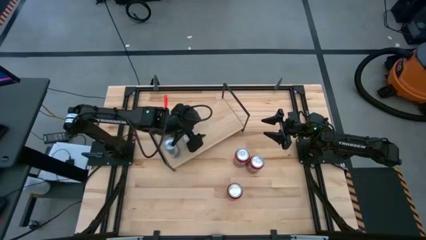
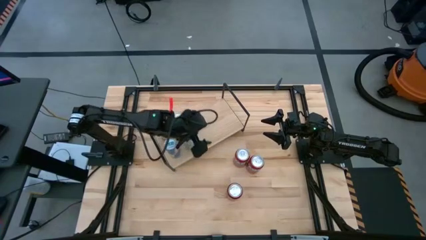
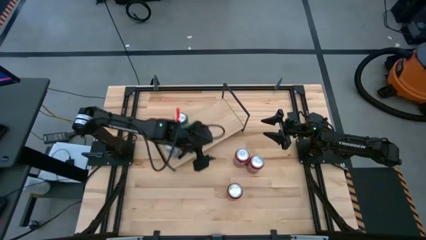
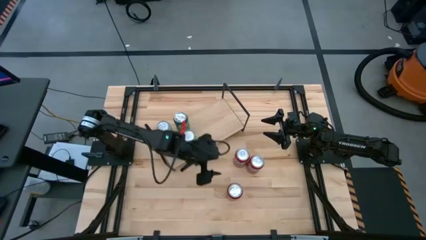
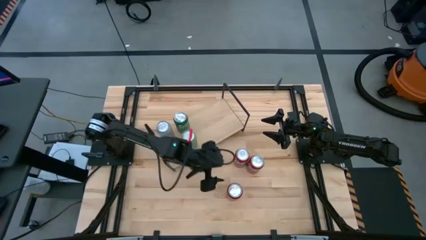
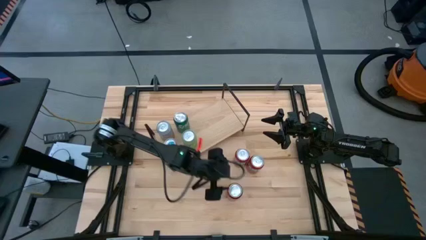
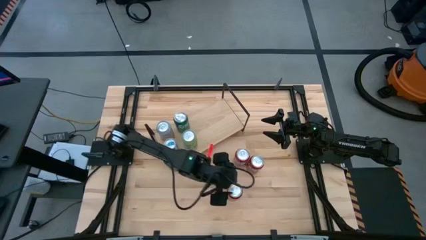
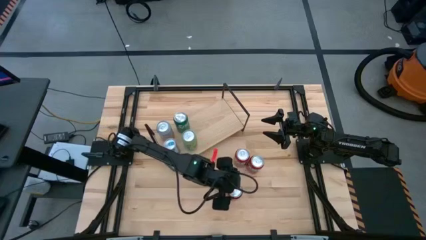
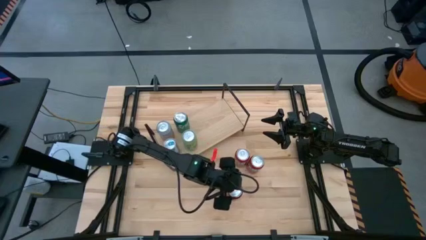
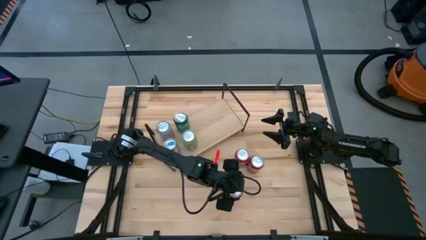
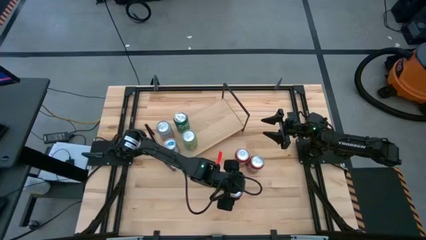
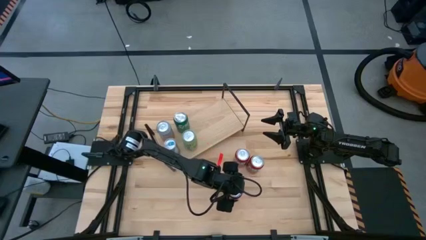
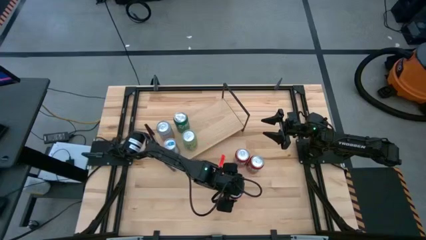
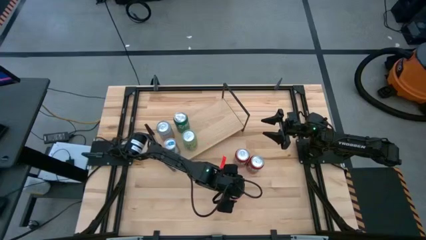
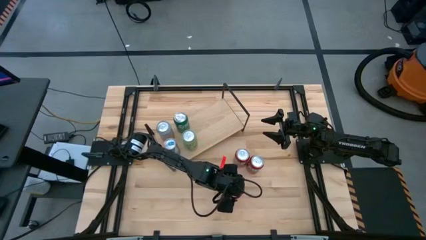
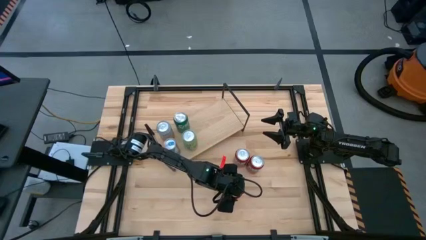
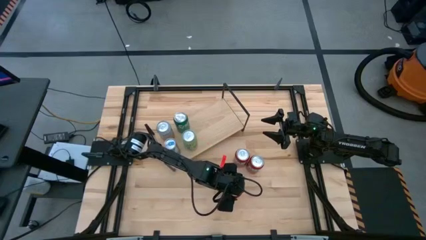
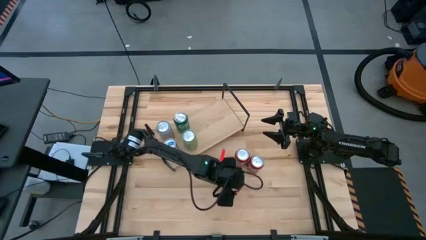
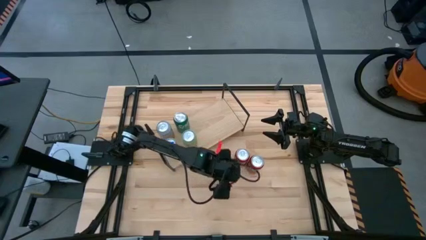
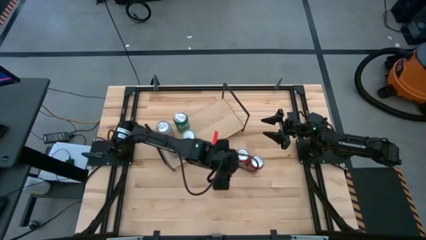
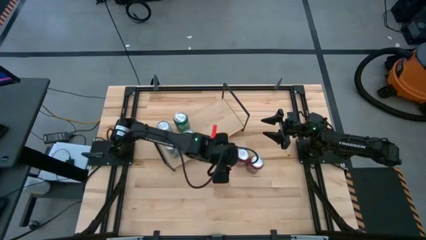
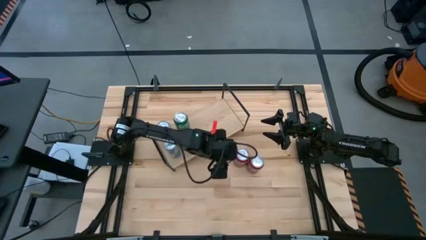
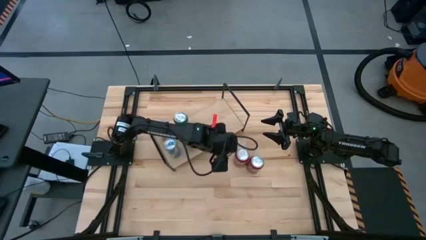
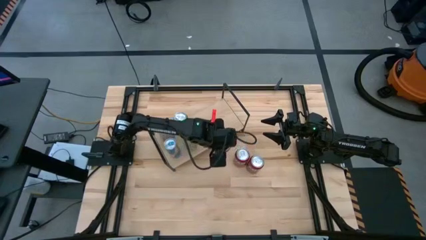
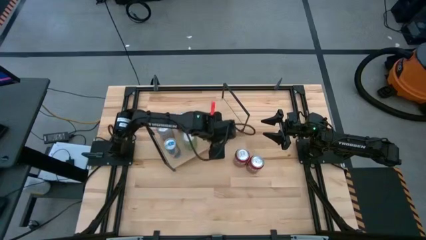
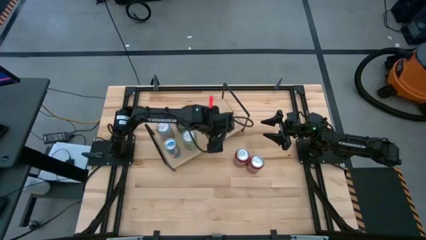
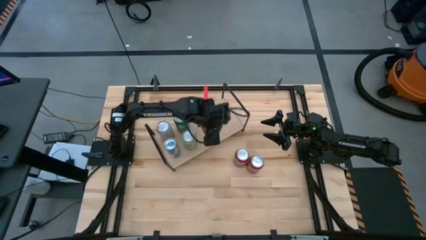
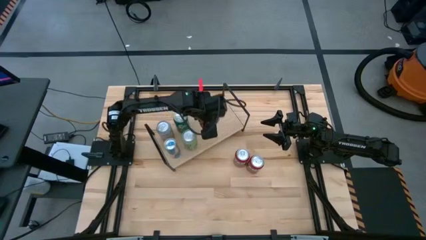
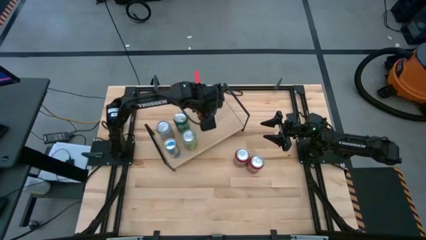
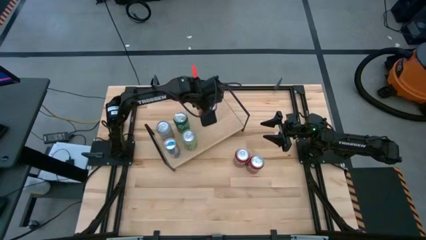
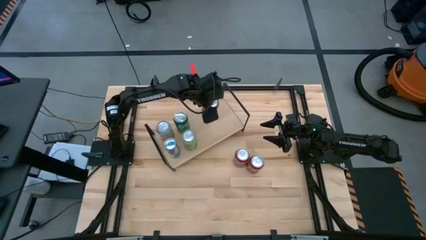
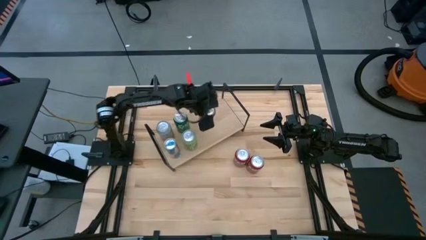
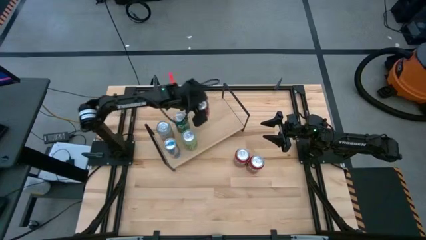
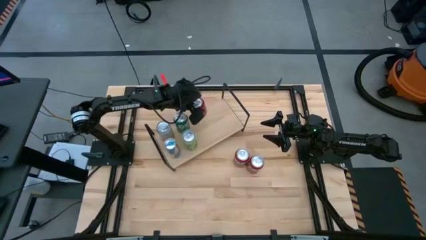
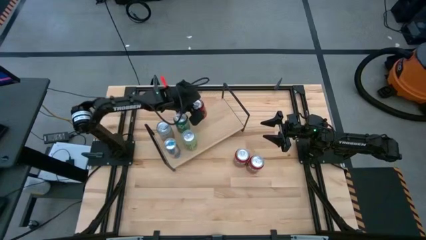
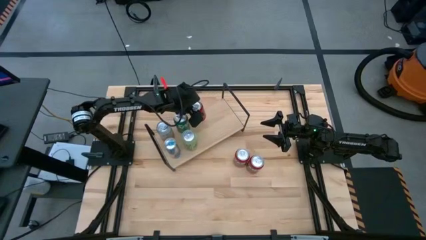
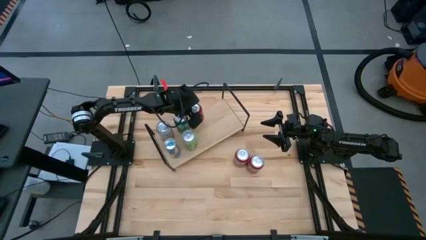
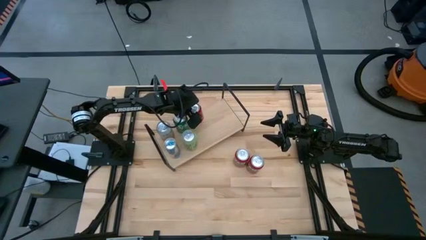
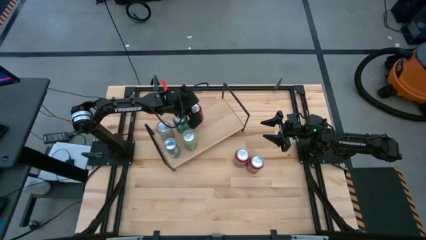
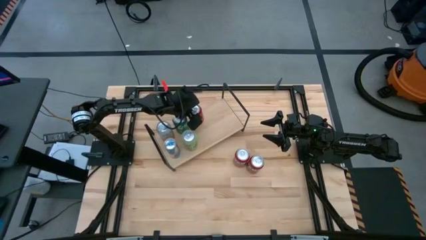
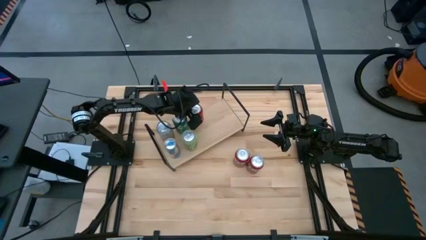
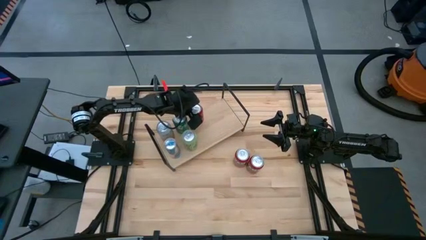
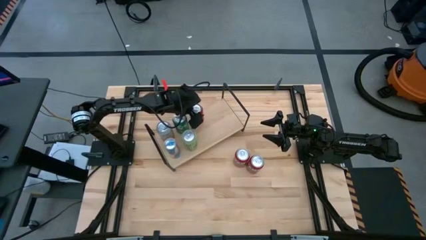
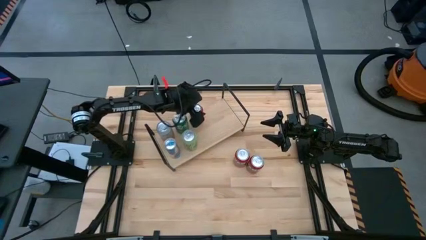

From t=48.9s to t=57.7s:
Task: Place canned beverage on shelf
Put the red black soda can on the shelf

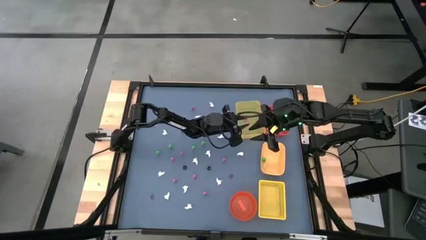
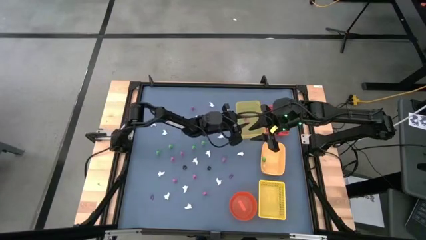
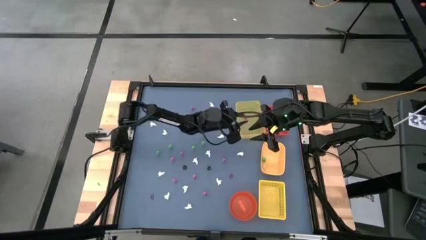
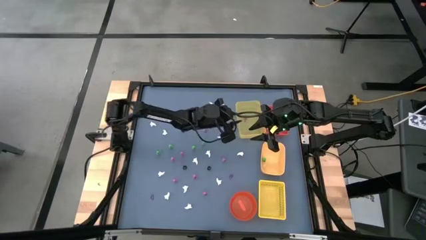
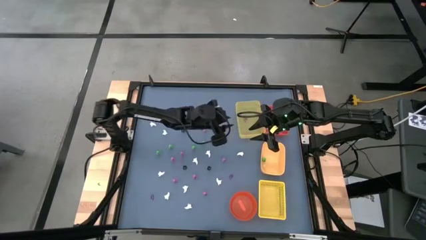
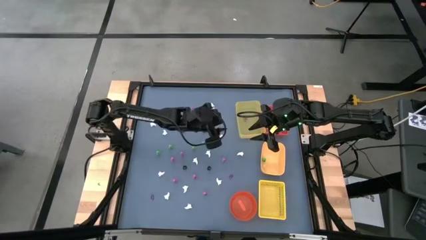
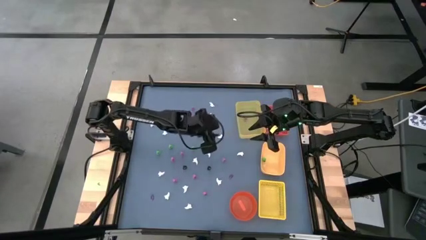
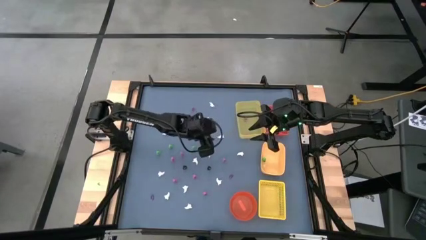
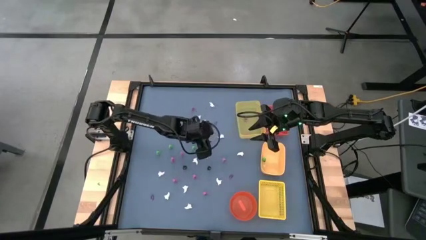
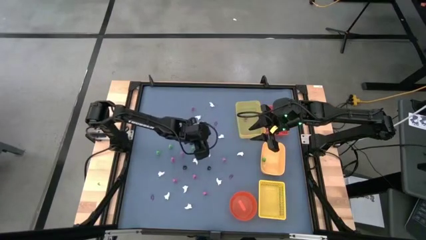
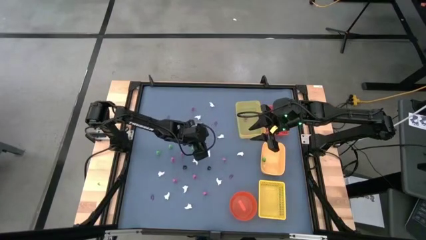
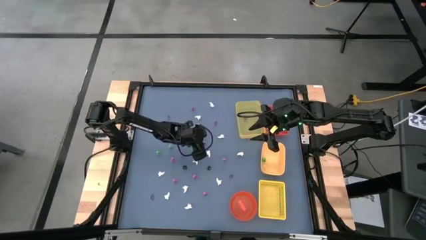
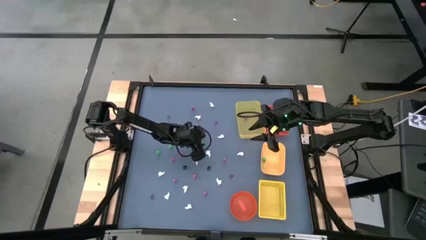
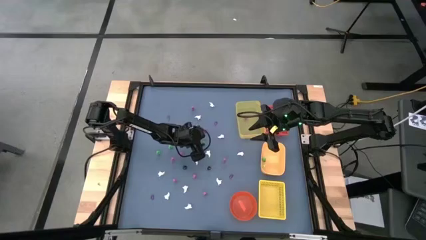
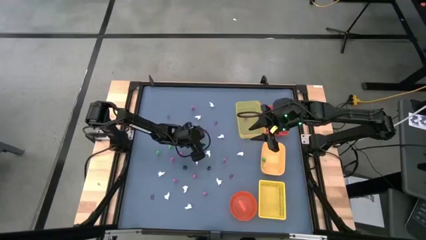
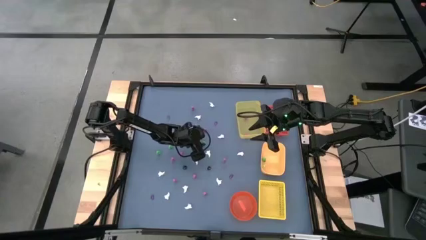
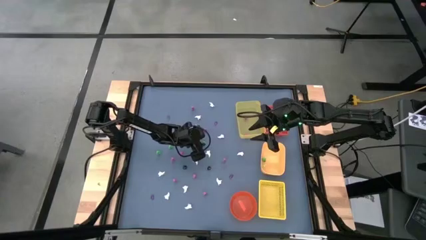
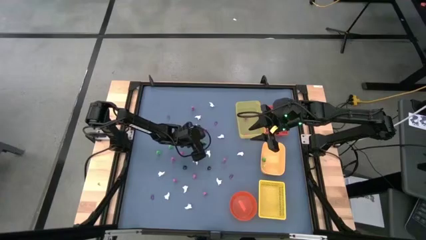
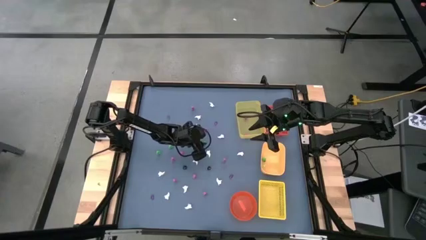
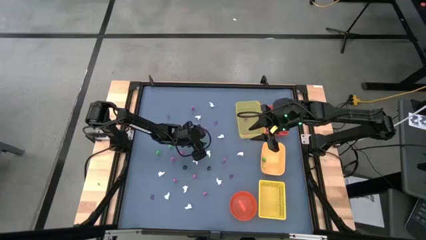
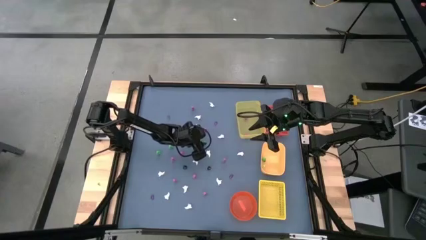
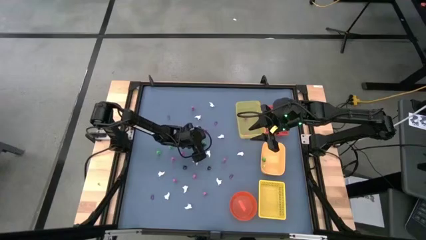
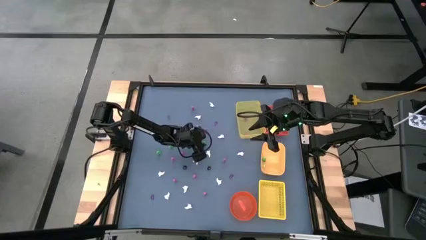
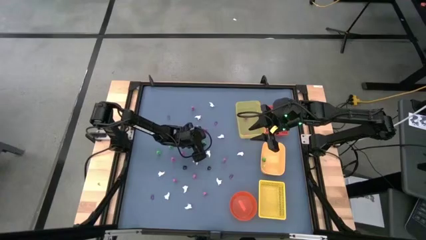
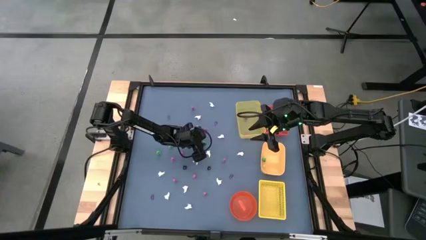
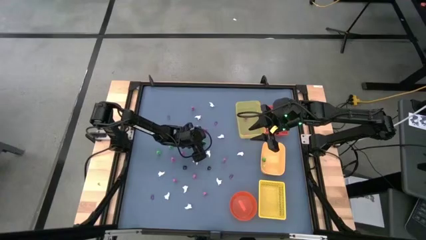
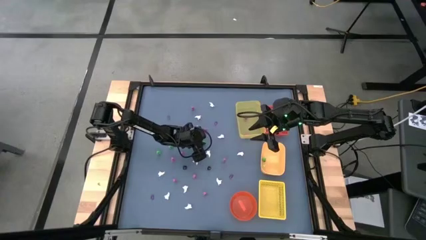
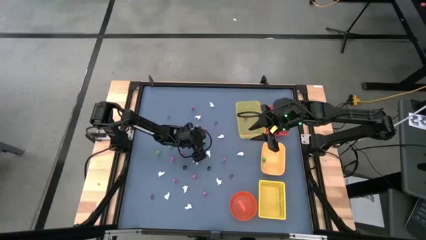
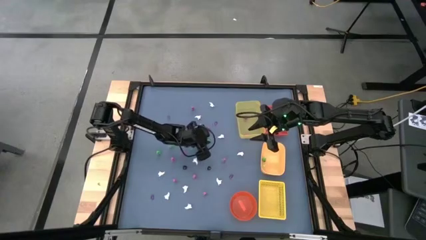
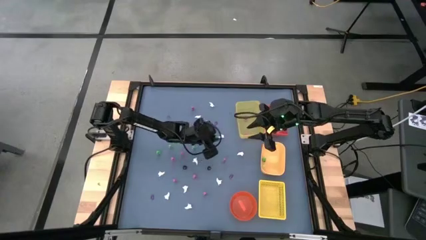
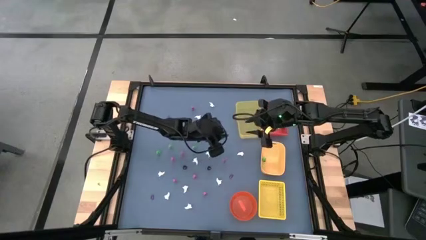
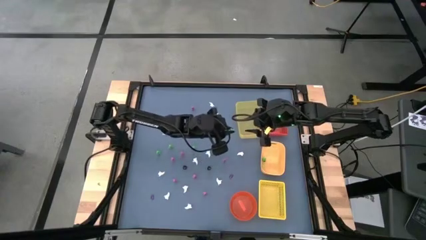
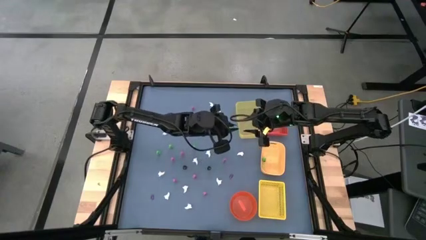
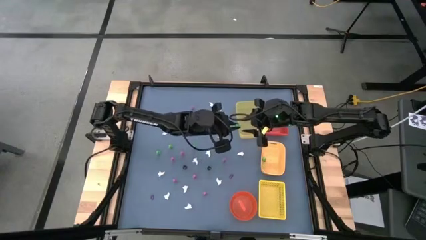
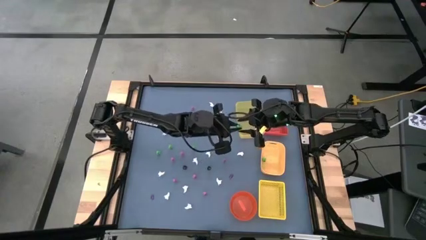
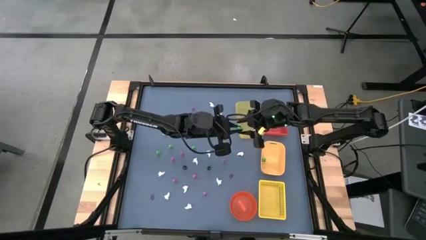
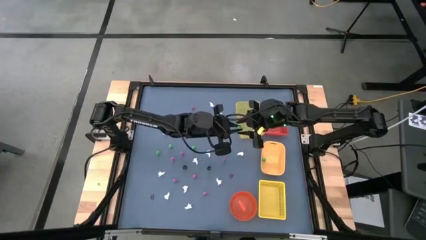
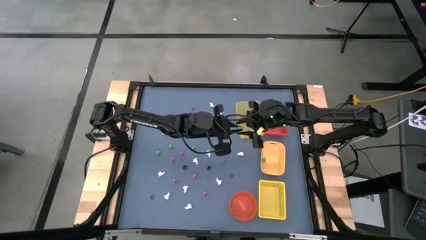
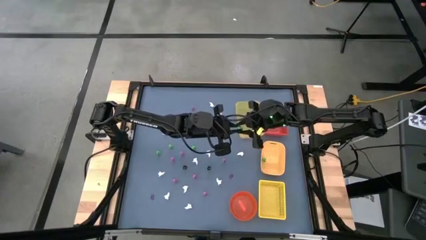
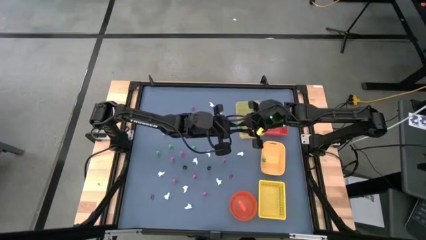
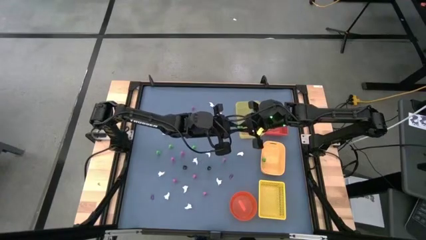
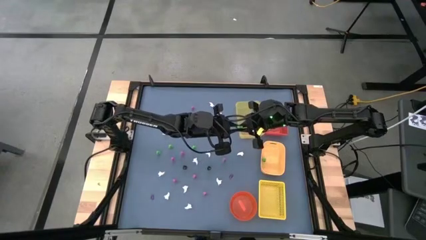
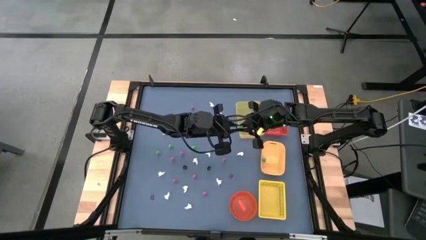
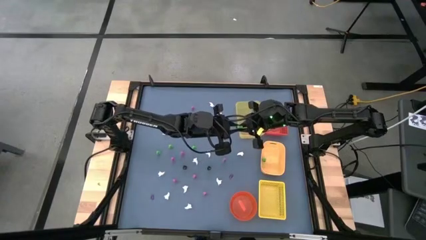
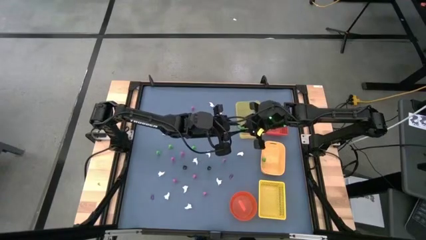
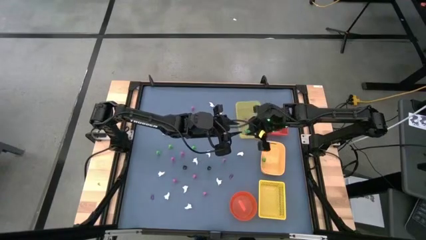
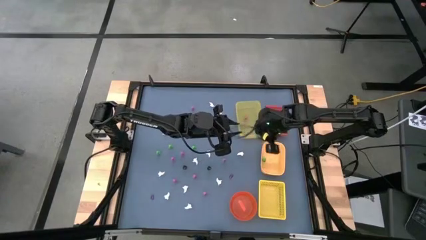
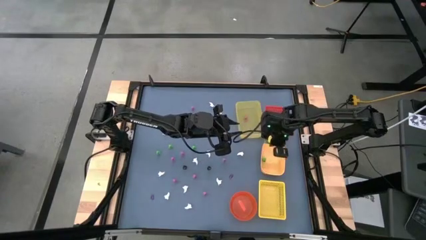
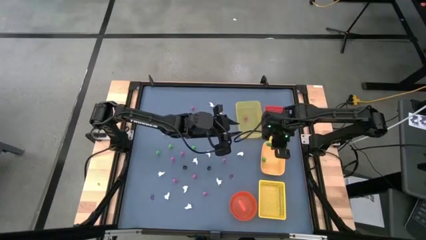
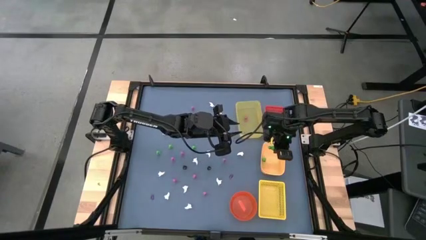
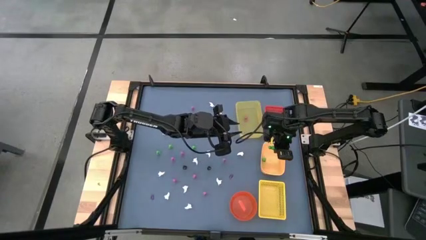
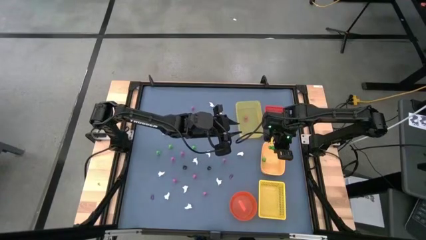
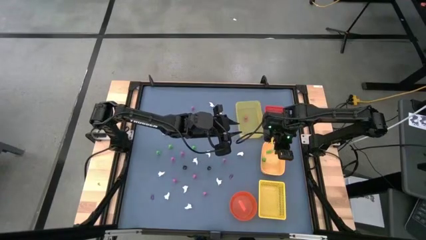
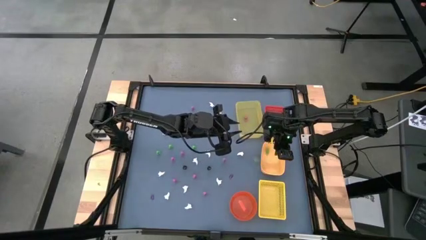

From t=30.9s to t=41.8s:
Task: Sort Halloween decoration
Put the green skeleton toy into the middle yellow bin
